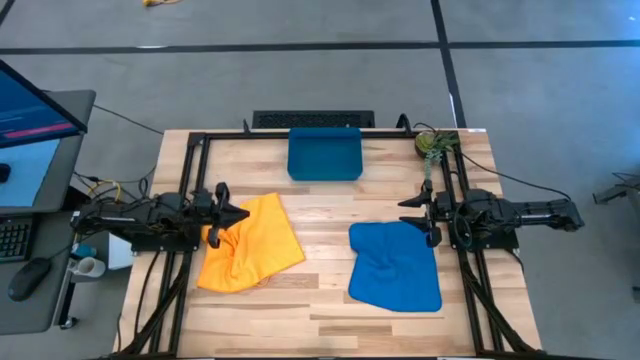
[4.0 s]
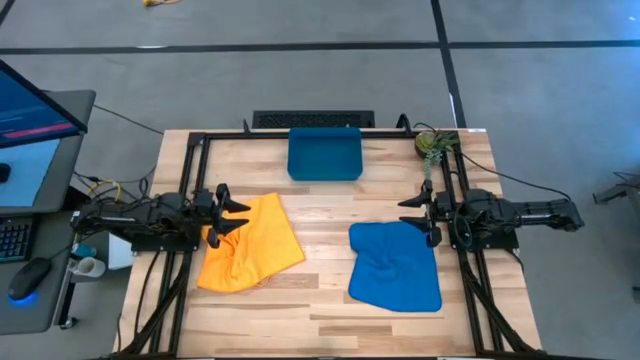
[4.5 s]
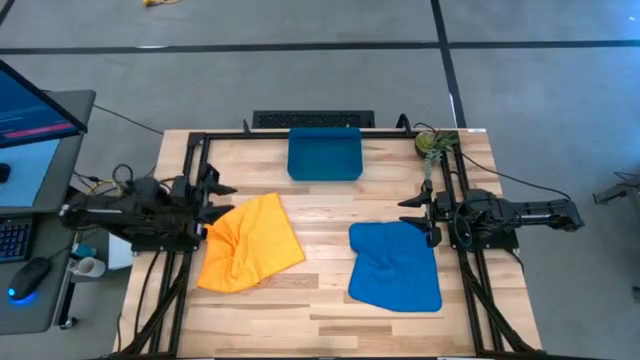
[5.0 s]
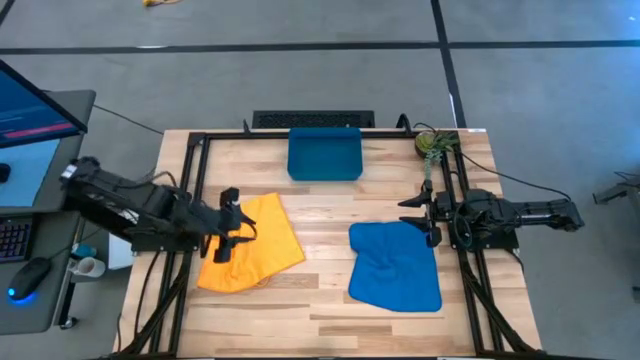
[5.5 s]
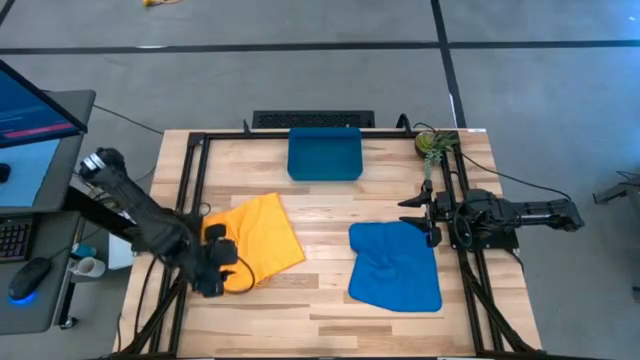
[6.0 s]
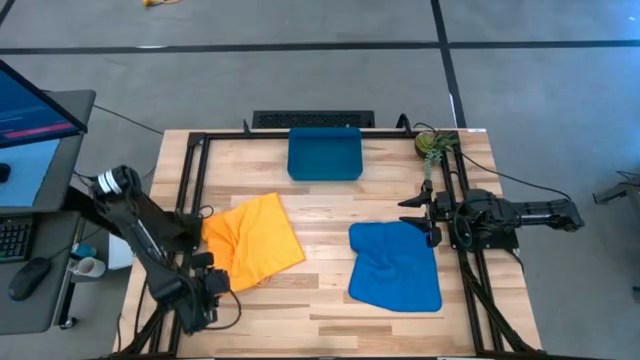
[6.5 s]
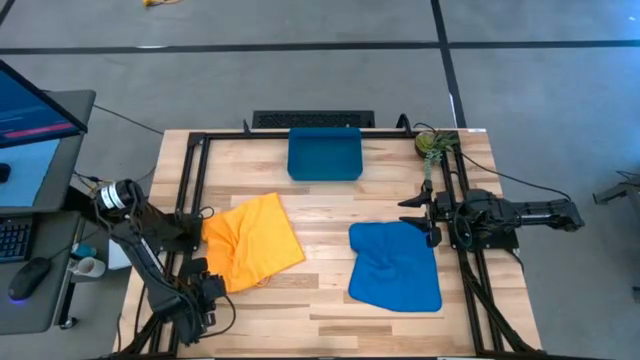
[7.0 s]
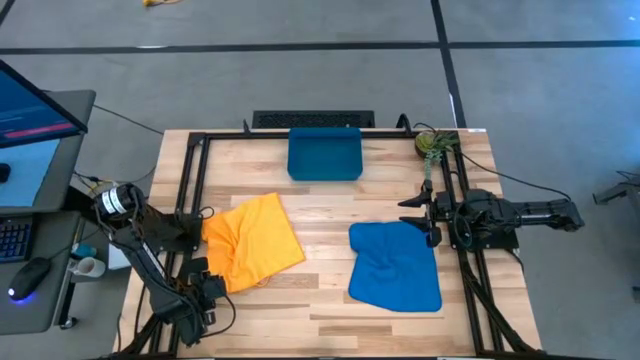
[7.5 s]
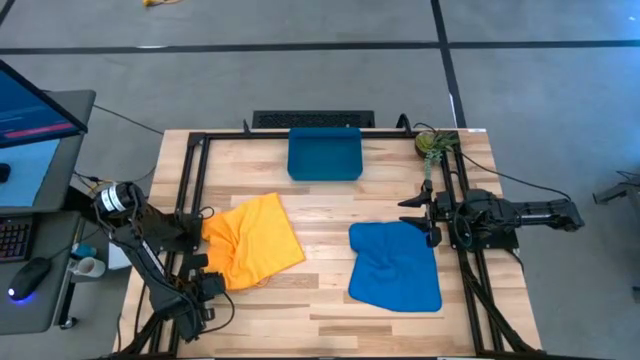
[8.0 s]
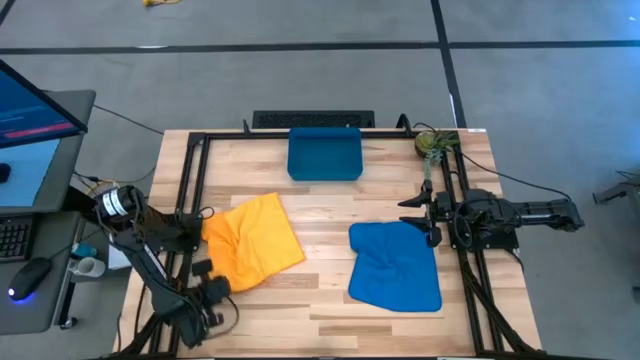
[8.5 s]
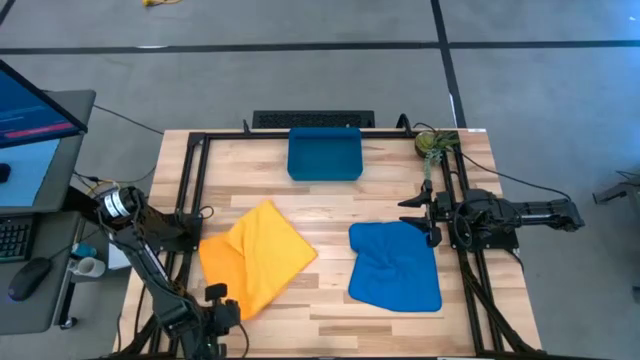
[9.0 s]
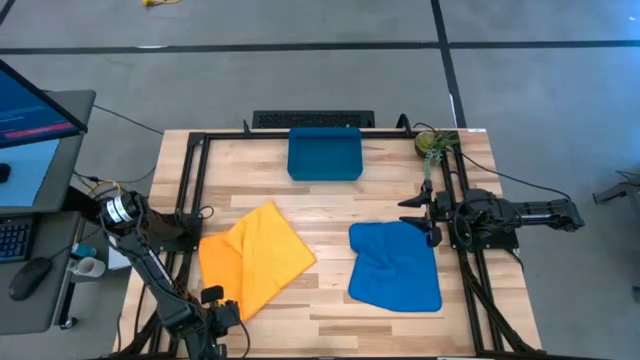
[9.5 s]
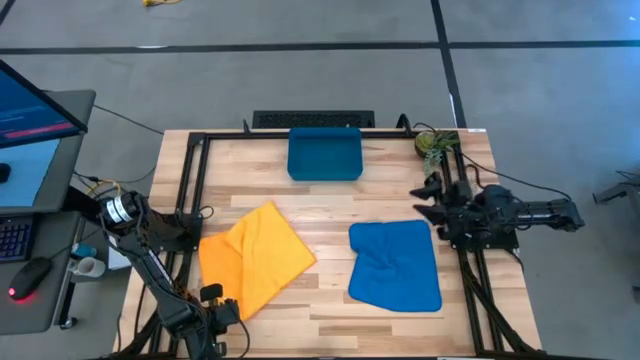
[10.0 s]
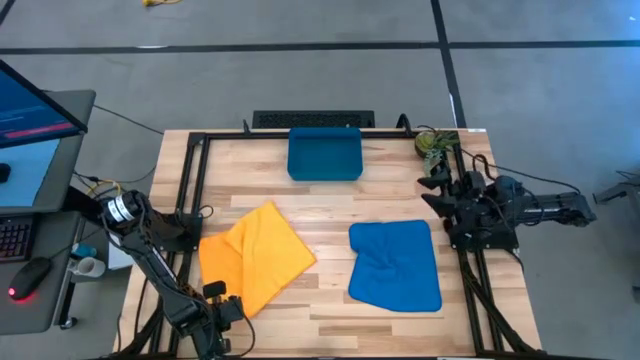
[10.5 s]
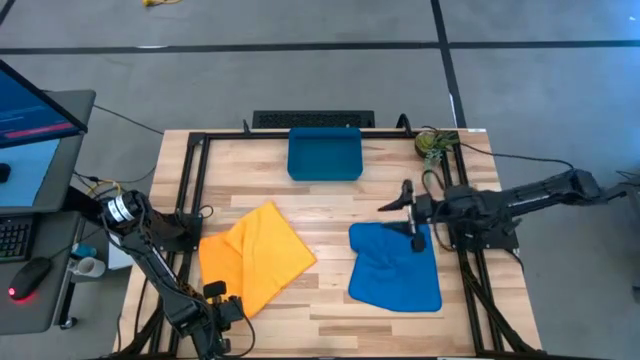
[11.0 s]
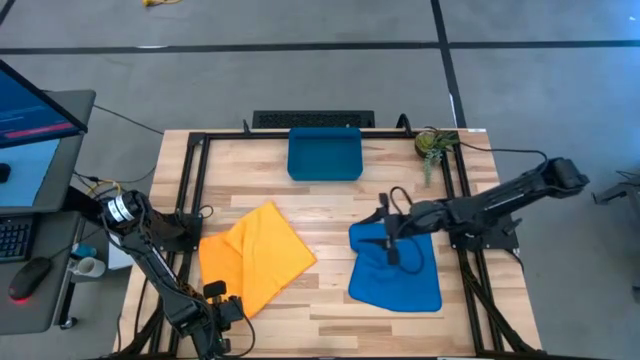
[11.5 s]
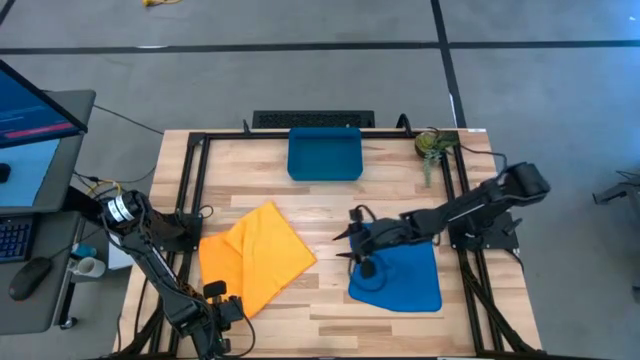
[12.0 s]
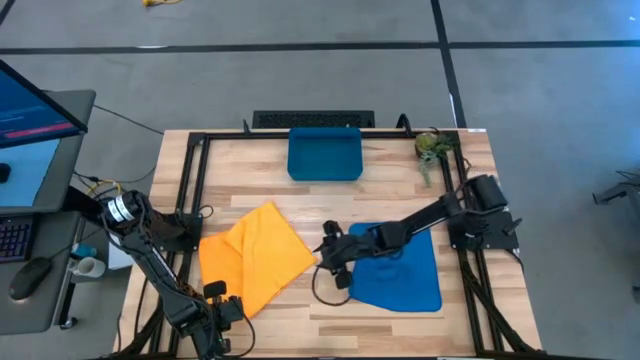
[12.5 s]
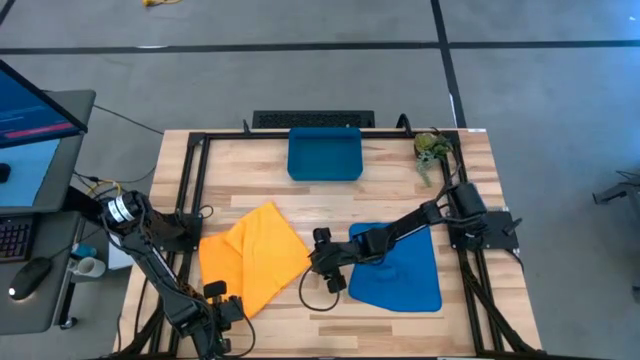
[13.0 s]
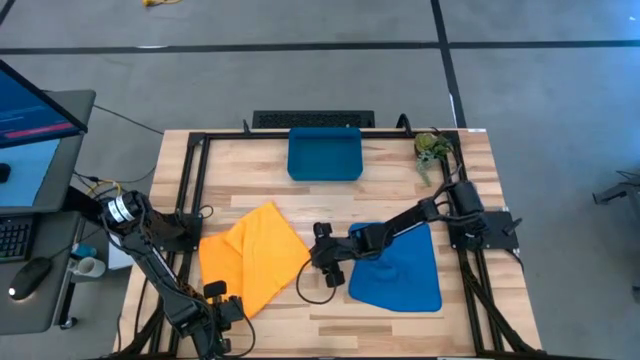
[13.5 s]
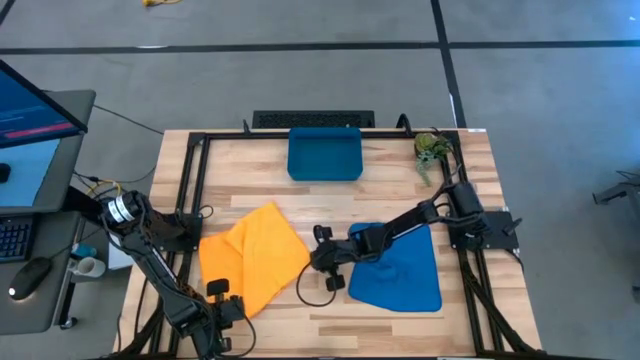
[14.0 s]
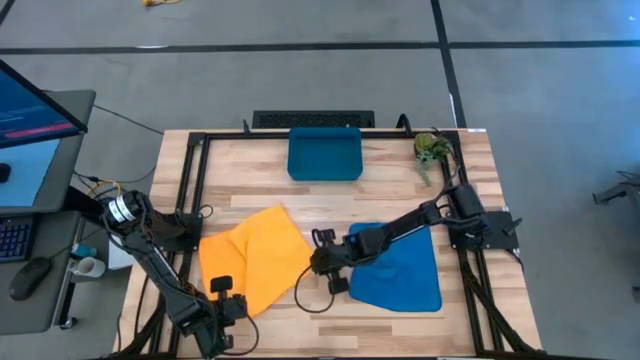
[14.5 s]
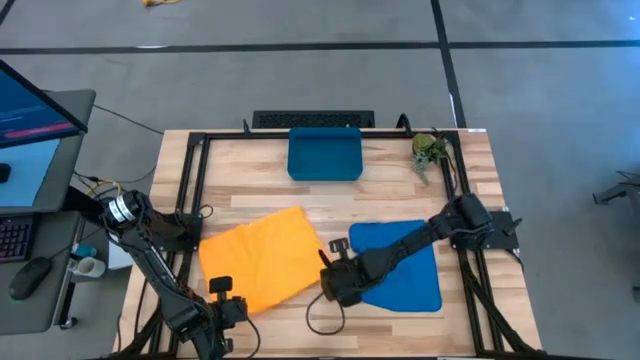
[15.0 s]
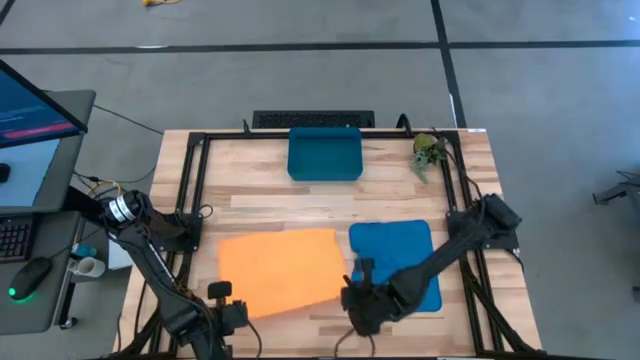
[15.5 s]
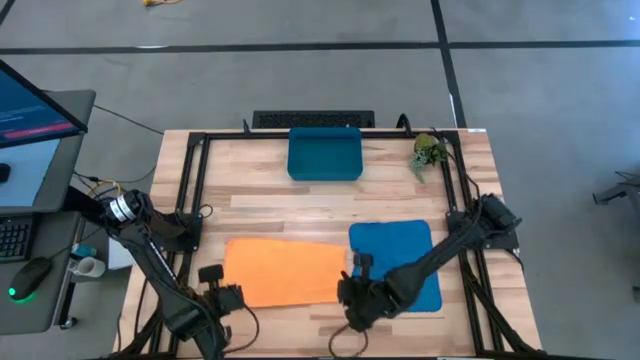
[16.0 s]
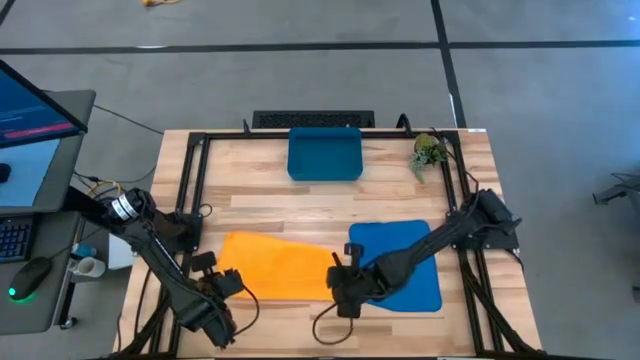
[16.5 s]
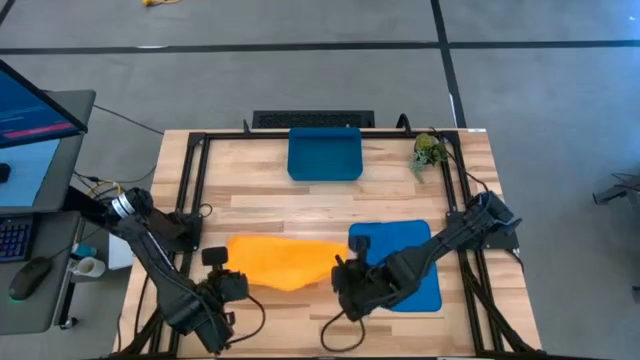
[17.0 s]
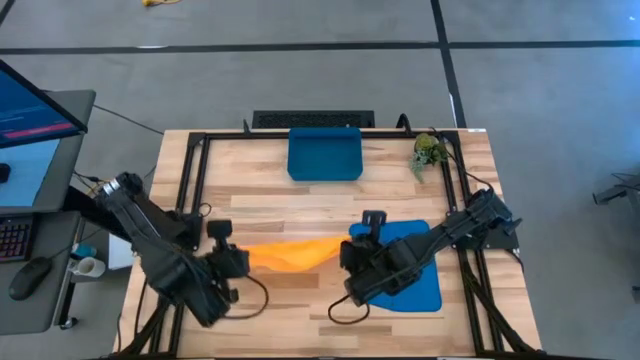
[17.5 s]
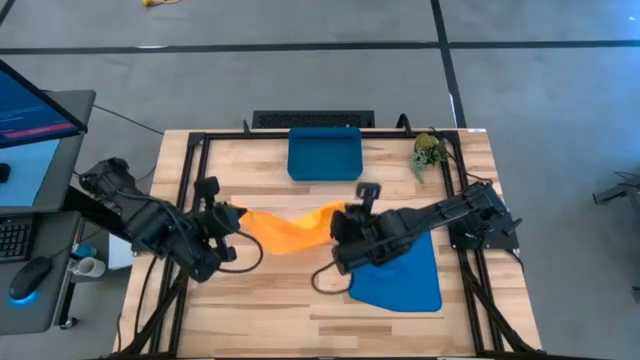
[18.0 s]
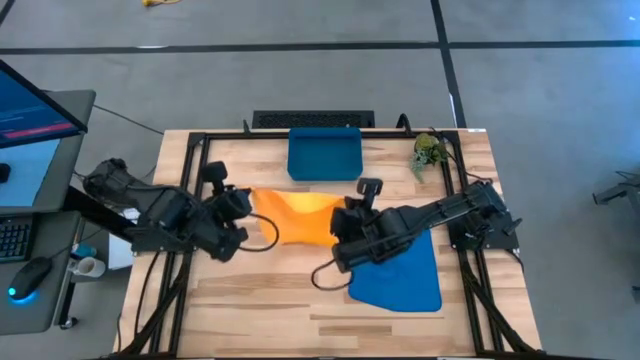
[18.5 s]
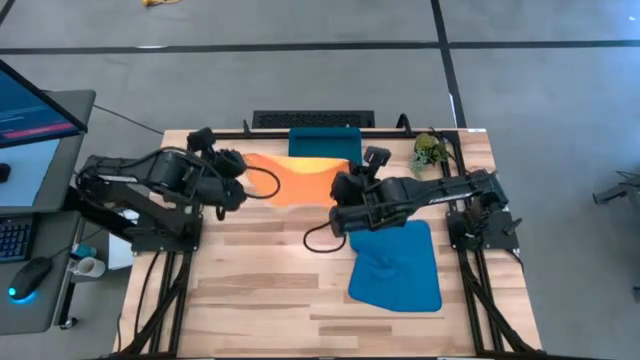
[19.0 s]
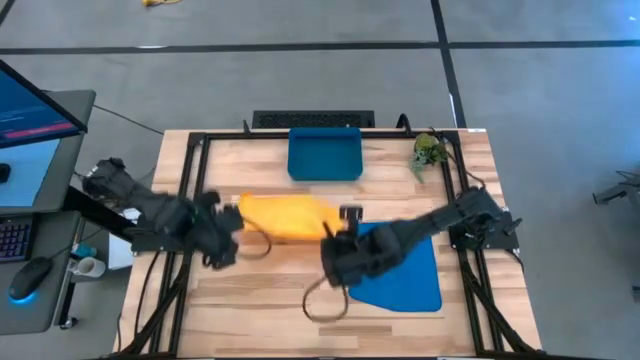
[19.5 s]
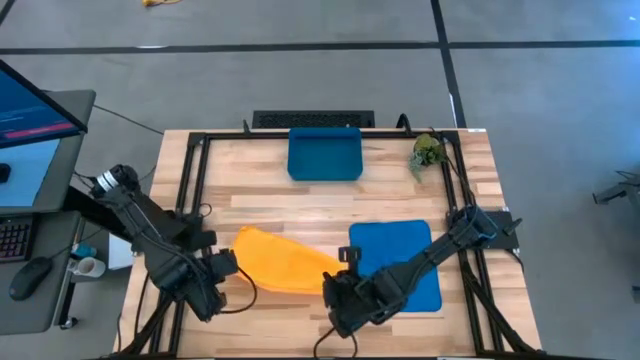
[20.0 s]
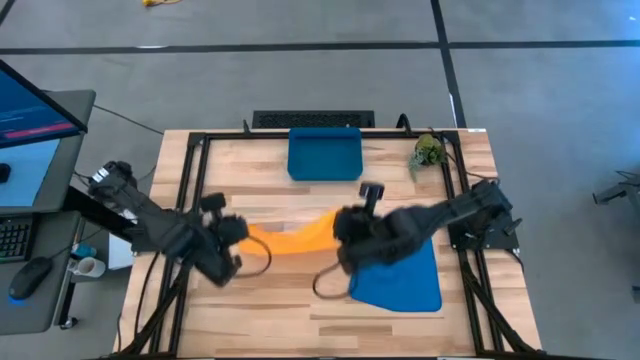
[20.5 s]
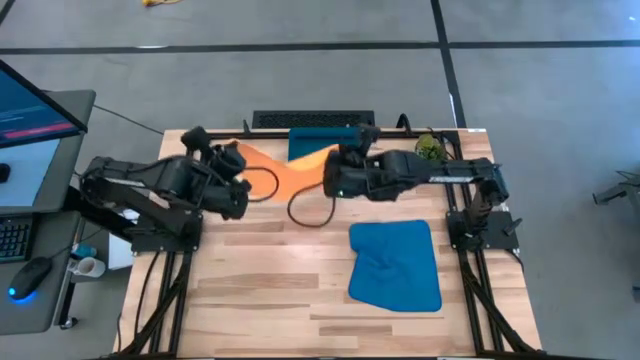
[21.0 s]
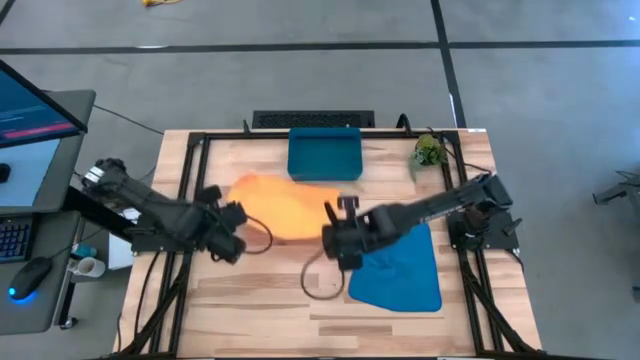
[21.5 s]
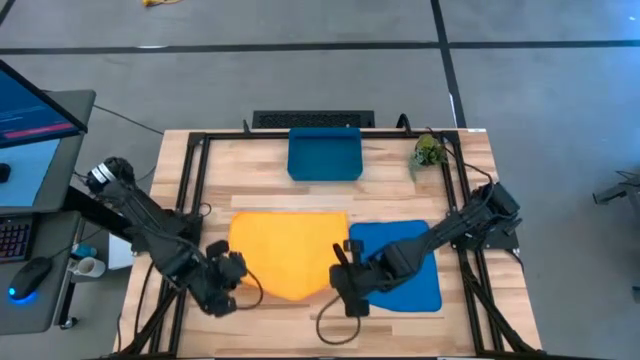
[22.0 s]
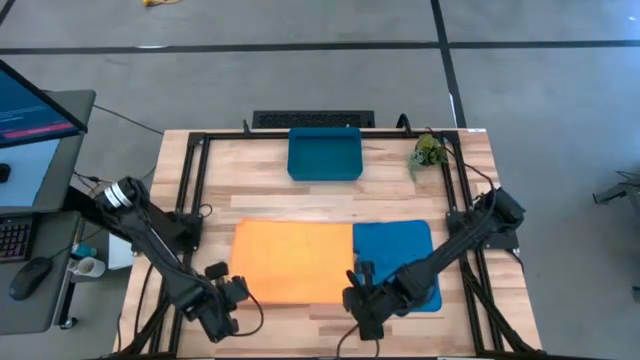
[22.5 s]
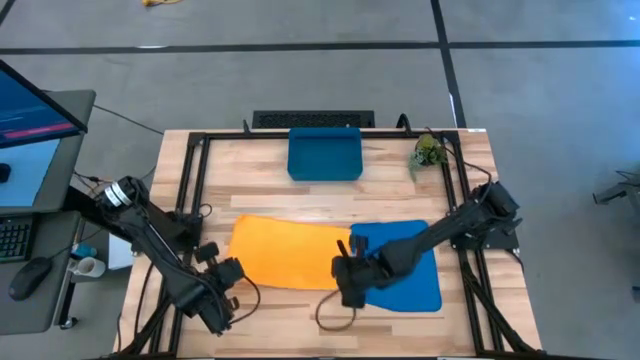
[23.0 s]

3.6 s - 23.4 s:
Task: Roll microfiber towels into tight, uniform cylinder then place into a basket
Fold the yellow microfiber cloth

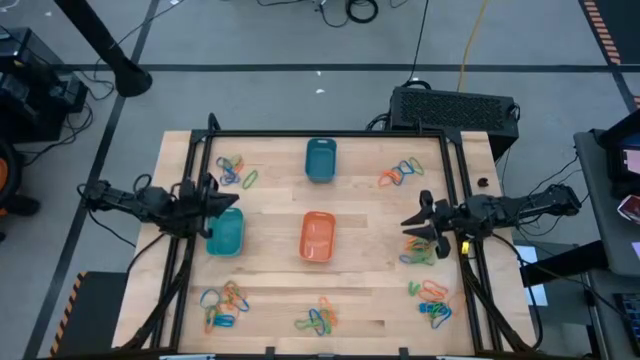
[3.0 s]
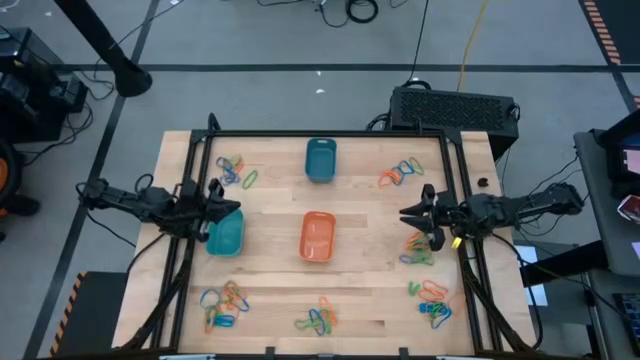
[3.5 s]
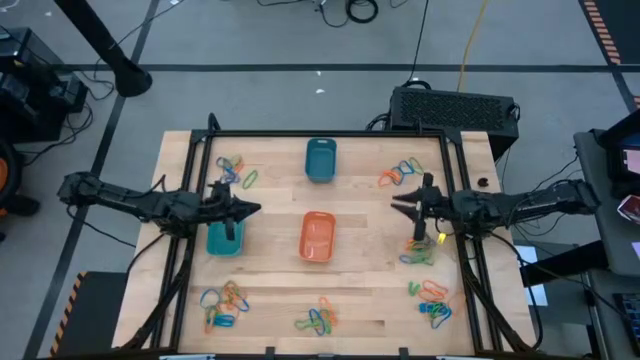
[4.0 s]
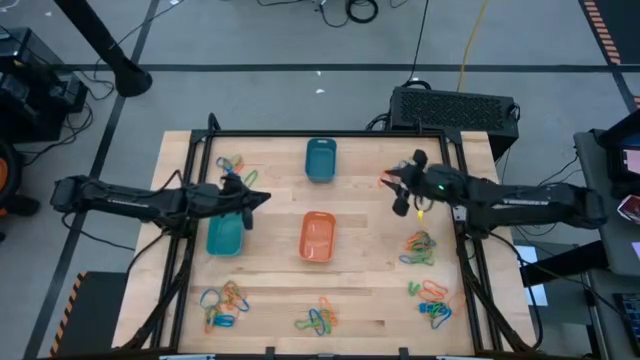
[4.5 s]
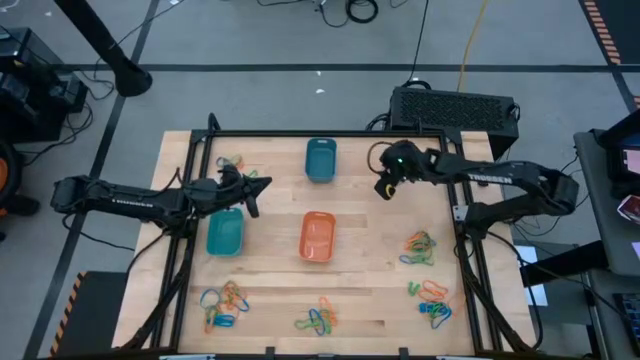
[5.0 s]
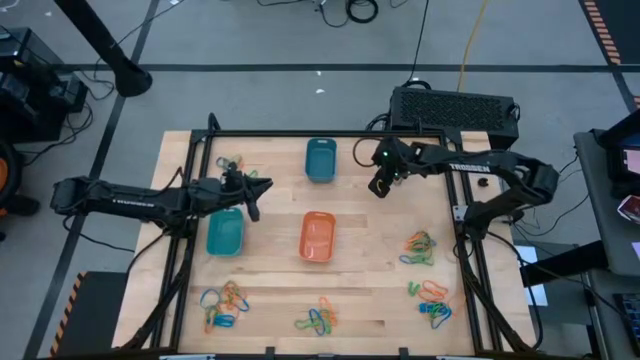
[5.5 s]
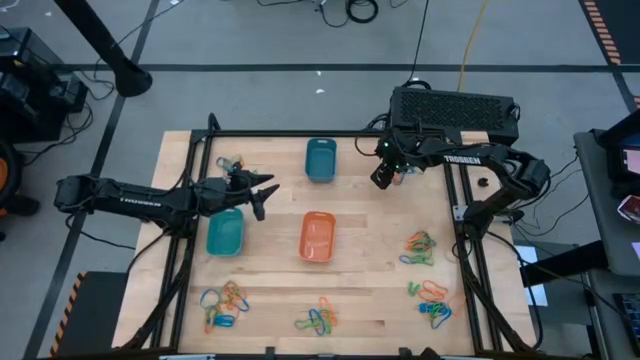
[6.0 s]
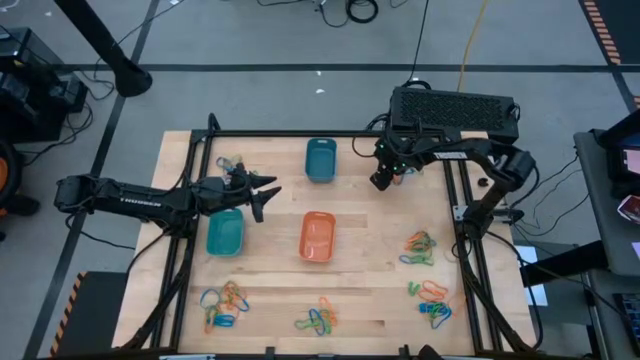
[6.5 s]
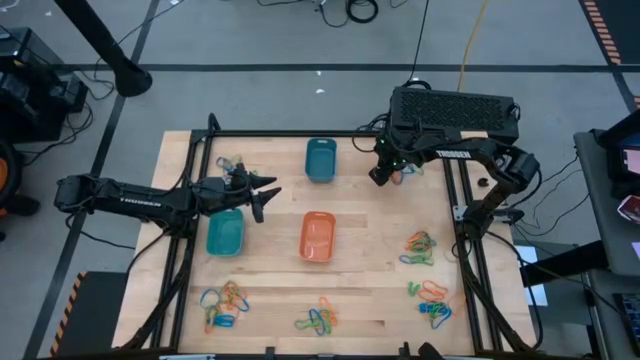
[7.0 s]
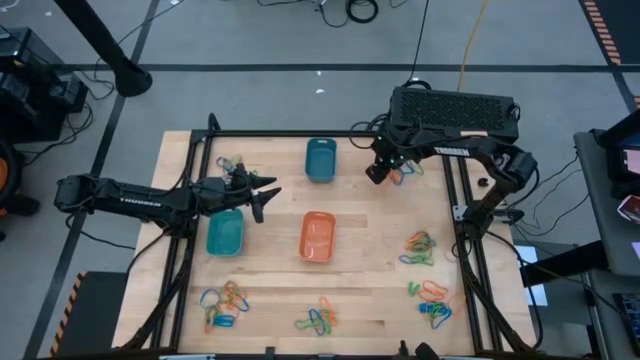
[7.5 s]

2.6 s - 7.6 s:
Task: Sort rubber bands into baskets
Put the orange rubber band into the orange bin
